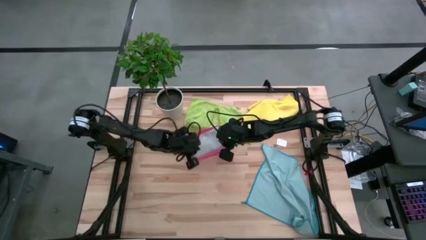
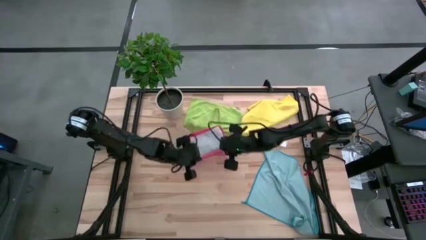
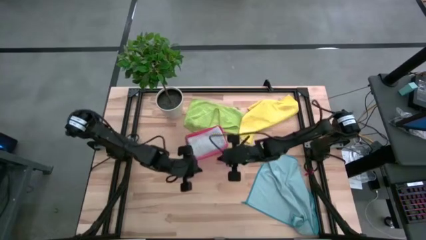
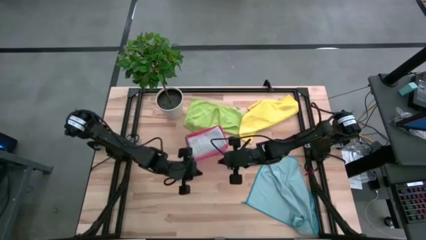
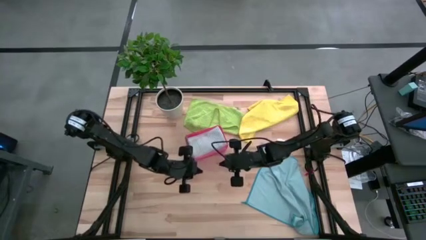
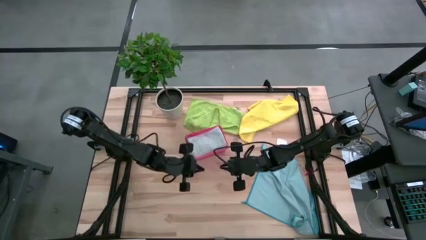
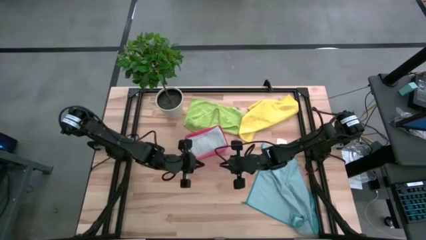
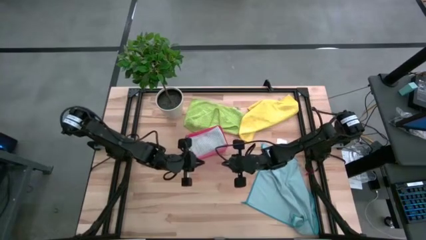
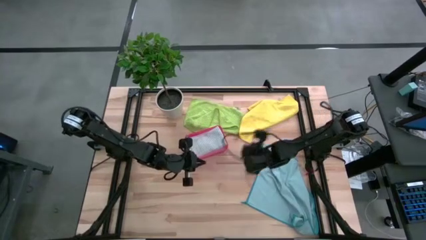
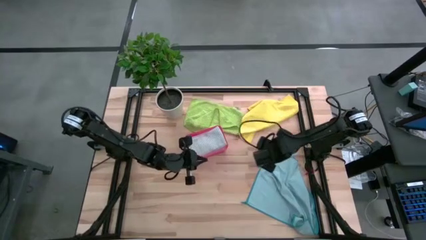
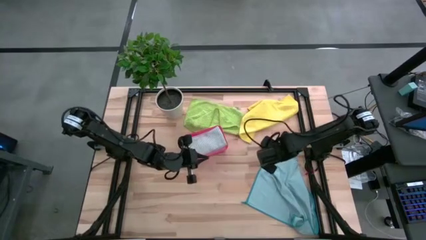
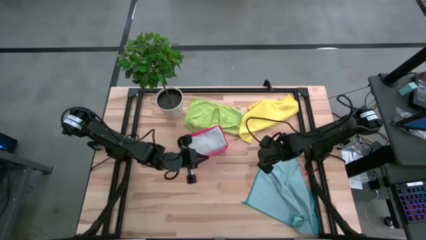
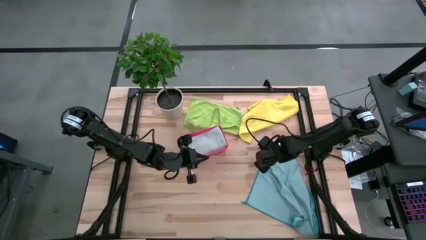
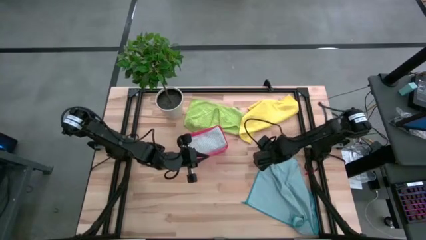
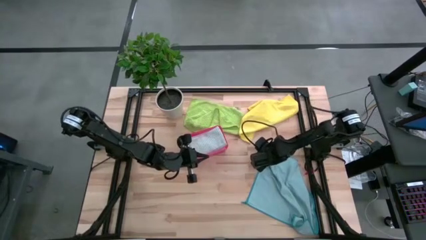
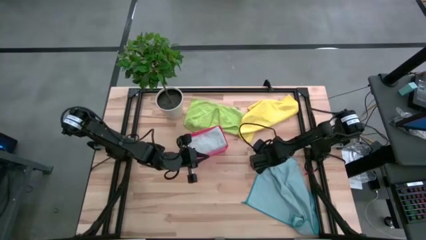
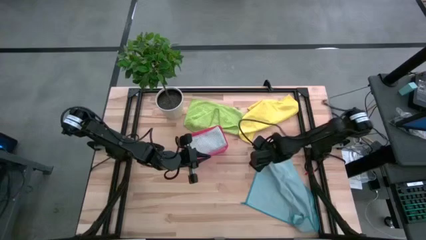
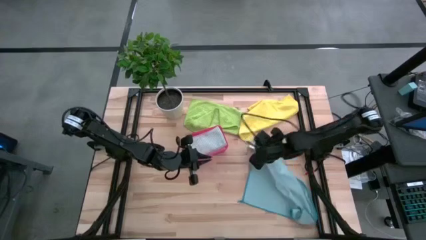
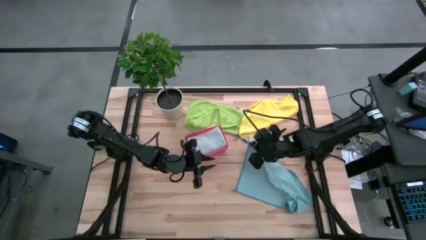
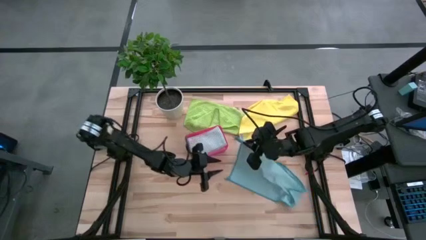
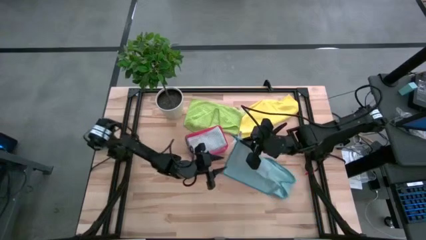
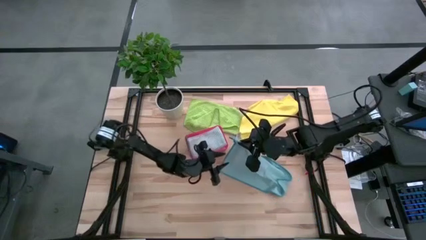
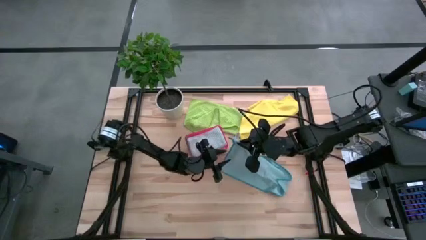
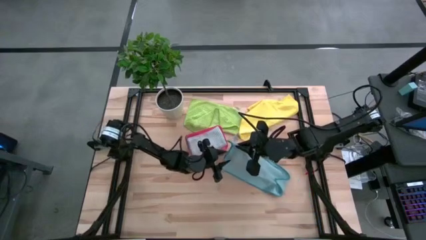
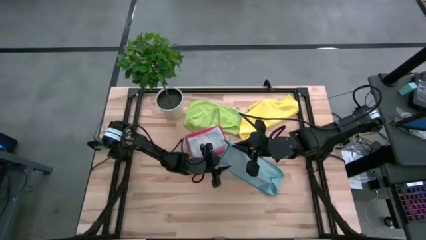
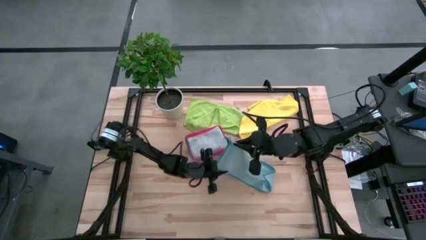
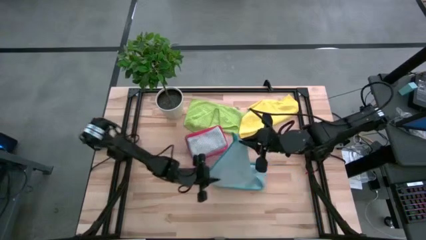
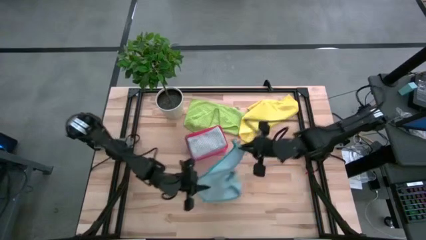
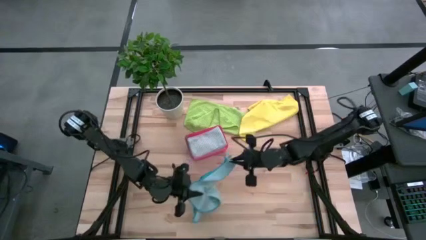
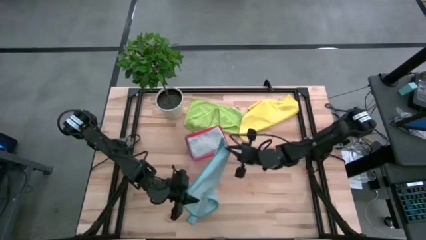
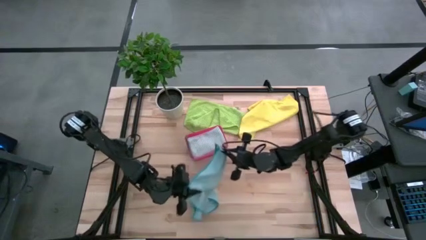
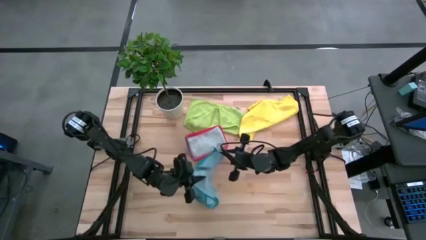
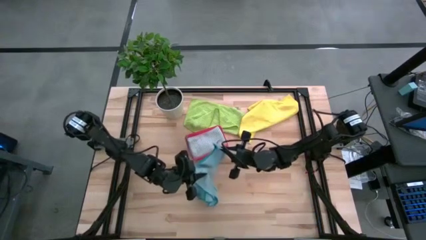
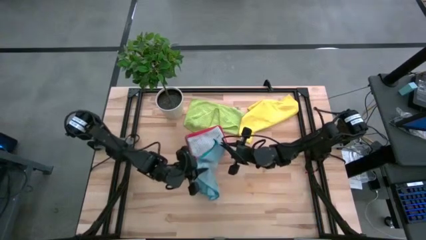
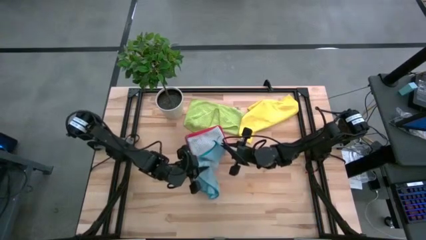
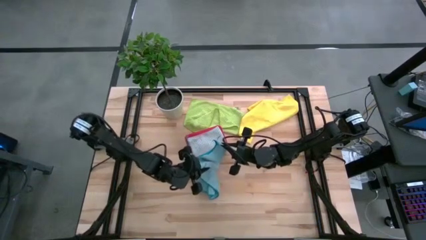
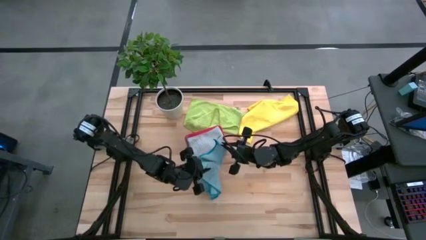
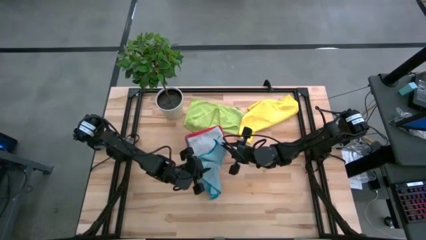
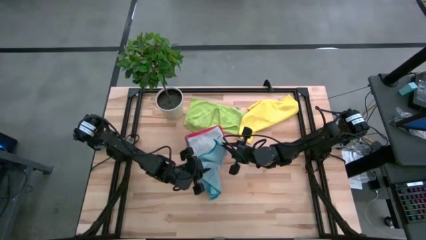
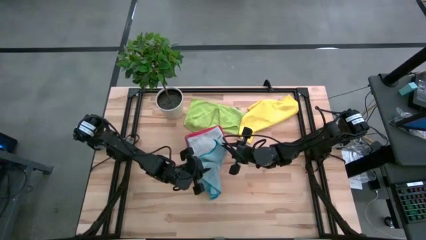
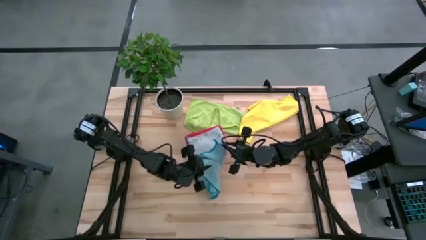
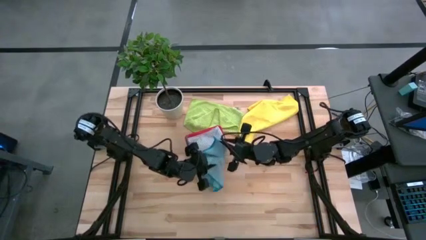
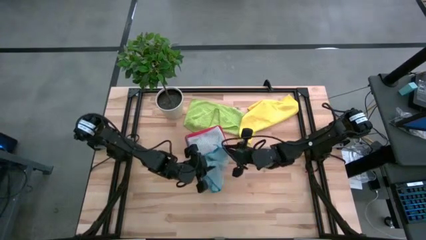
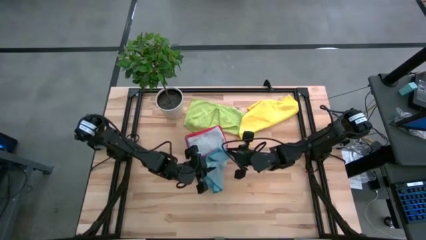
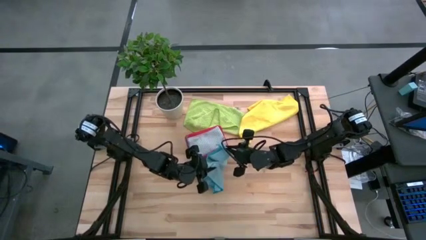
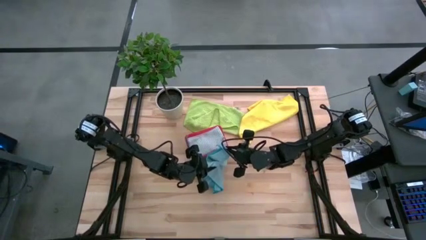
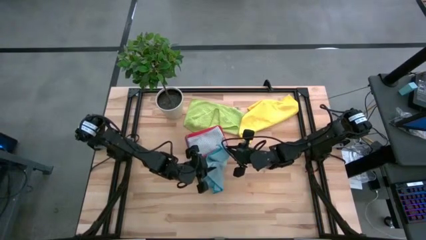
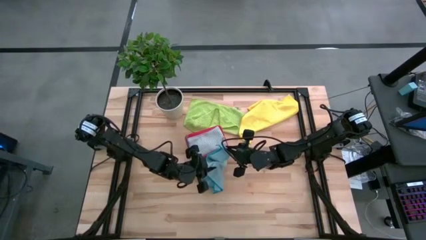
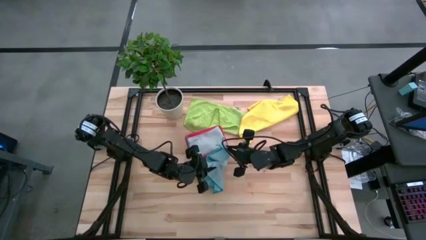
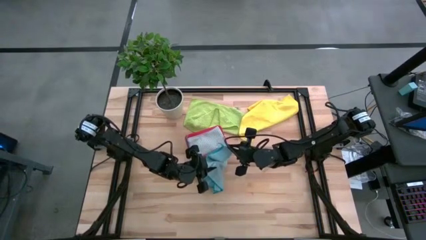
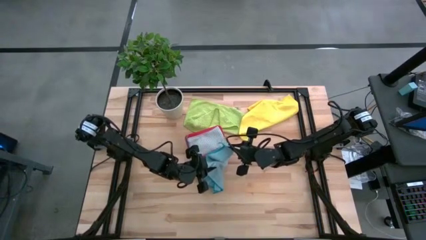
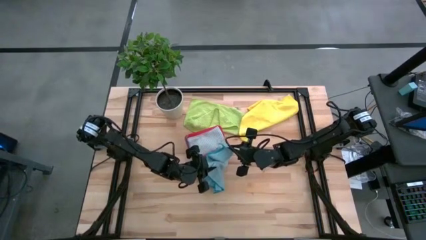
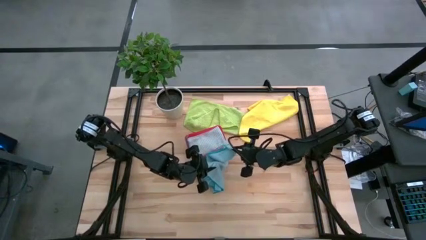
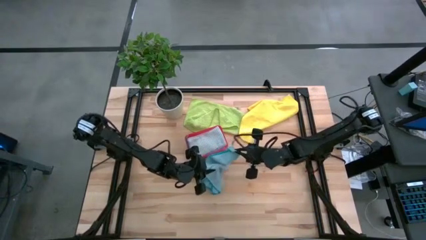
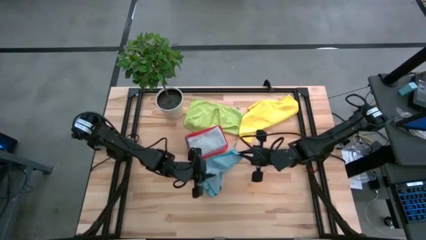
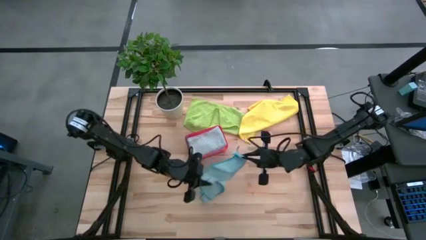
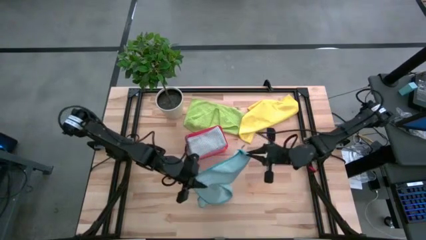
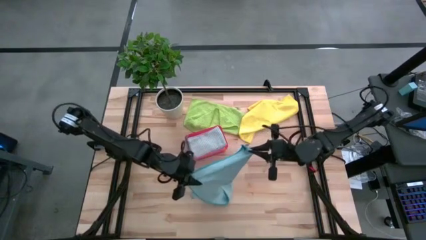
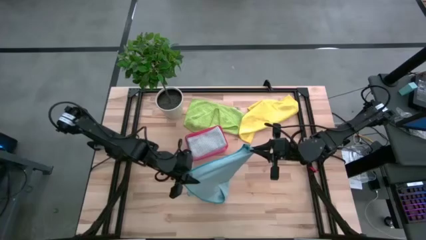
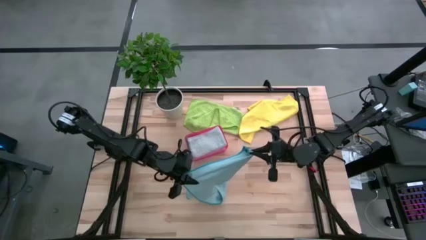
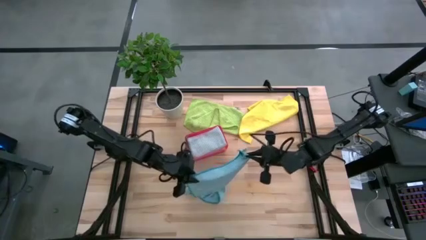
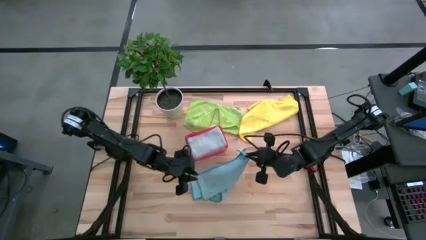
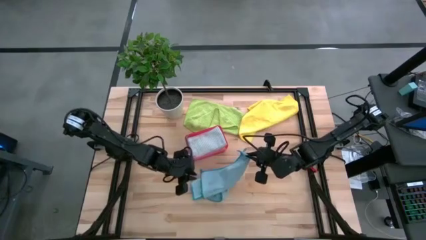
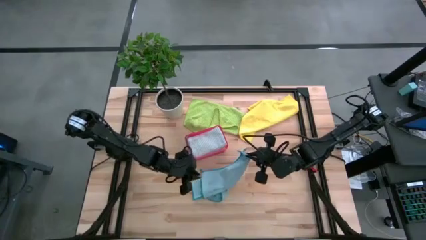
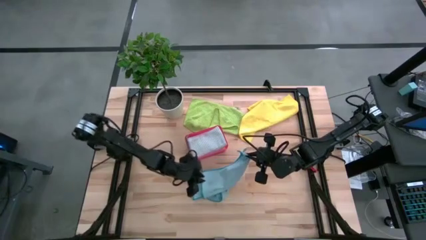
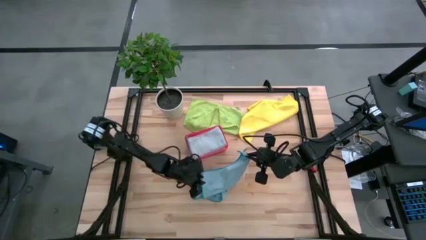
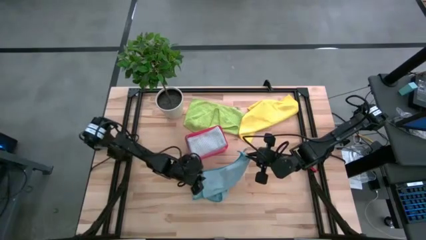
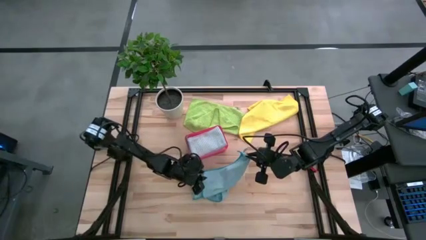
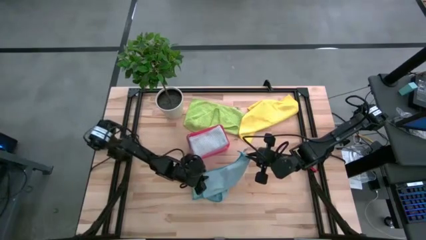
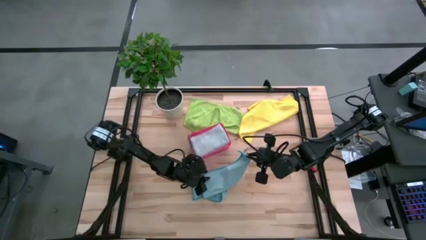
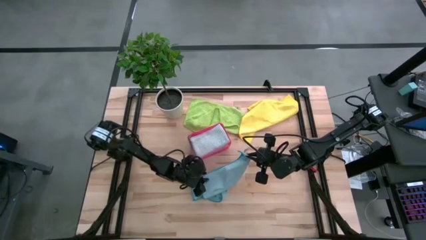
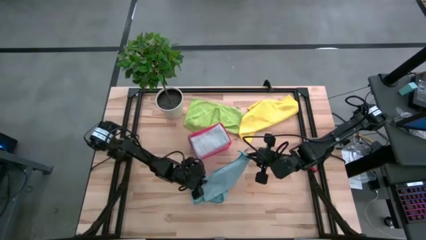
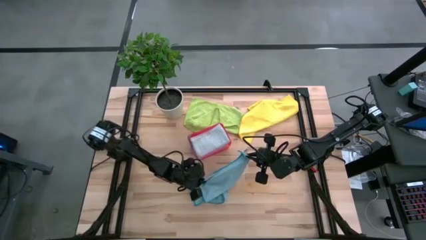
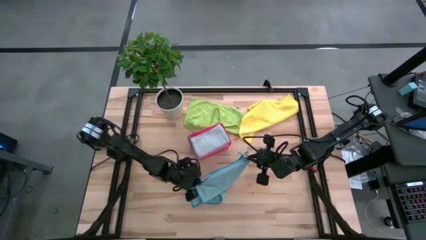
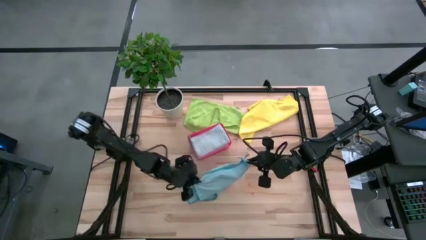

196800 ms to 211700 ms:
Task: Fold microfiber towels
Fold the blue microfiber cloth

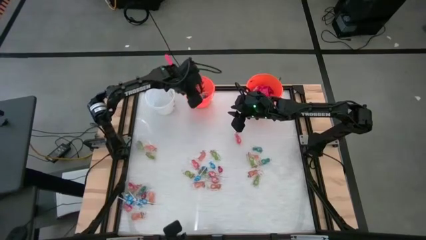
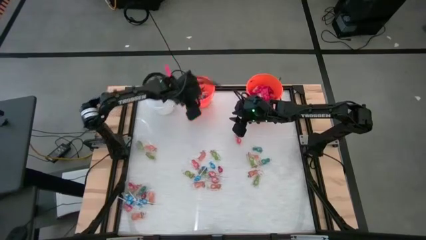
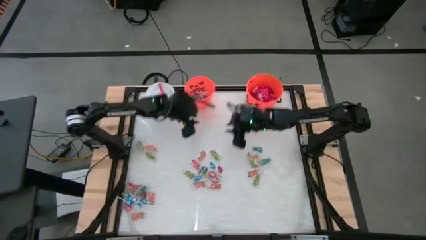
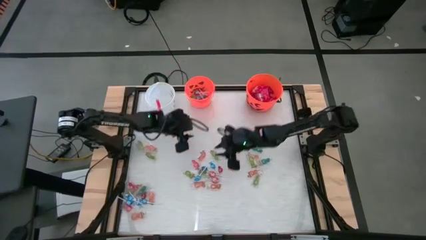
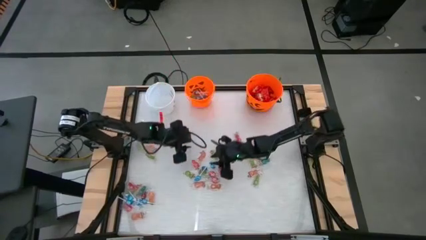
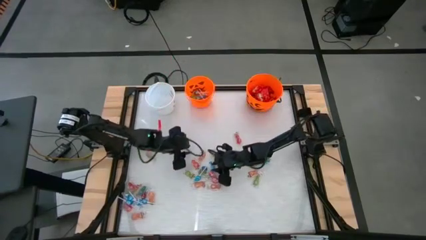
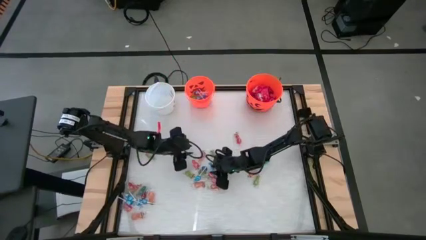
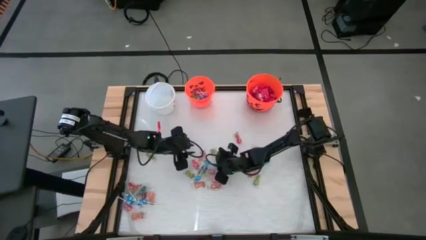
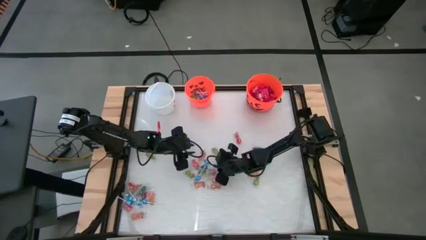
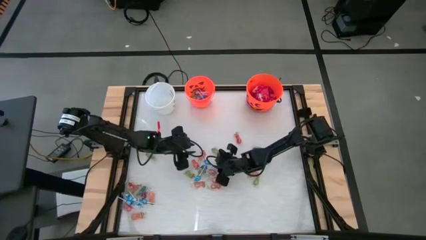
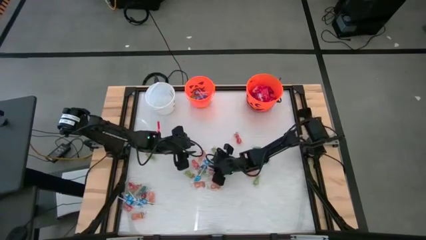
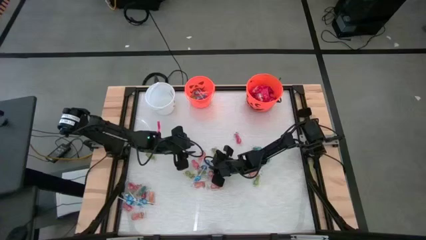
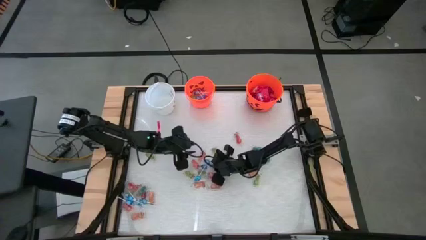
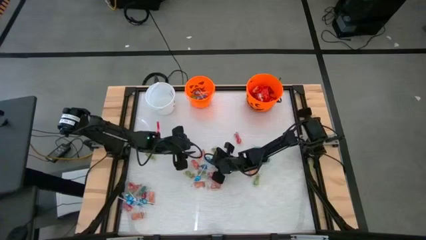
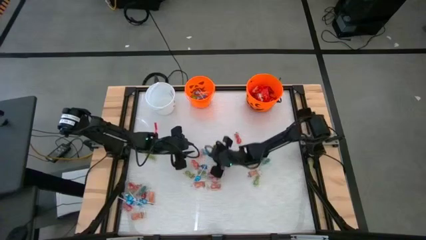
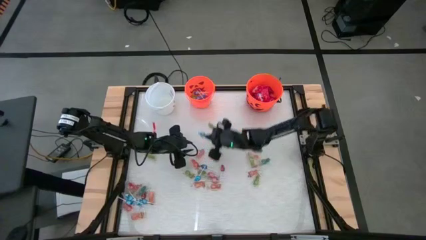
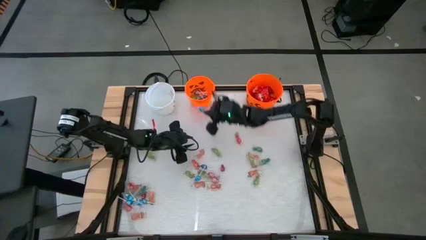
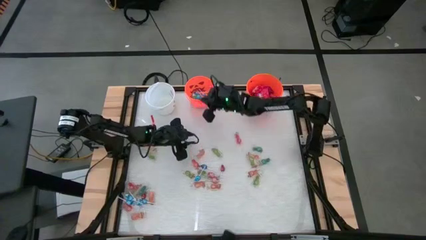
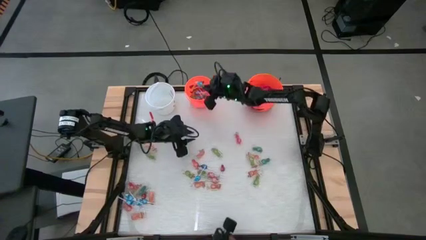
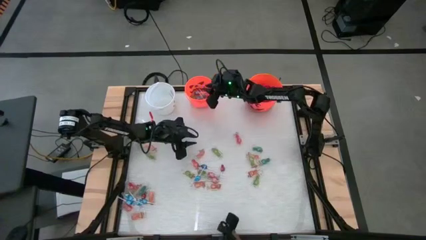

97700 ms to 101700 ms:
Task: Sort candy by brand, put in halloween buckets
Put the blue lollipop into the left orange bucket
